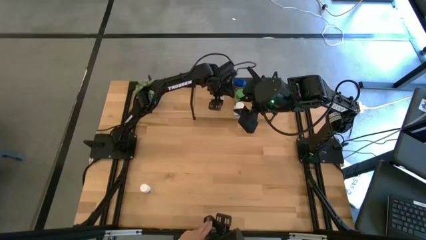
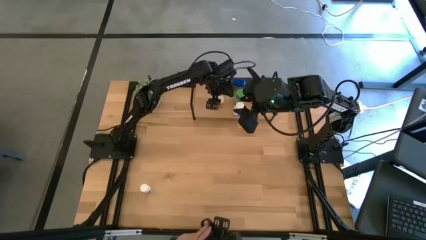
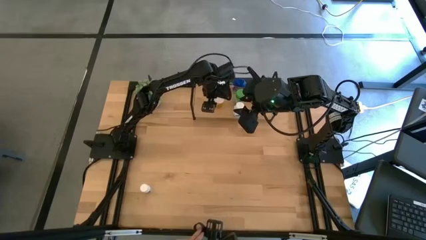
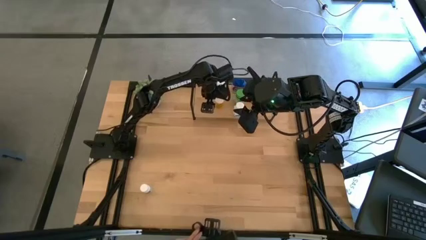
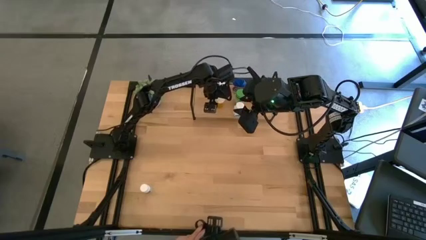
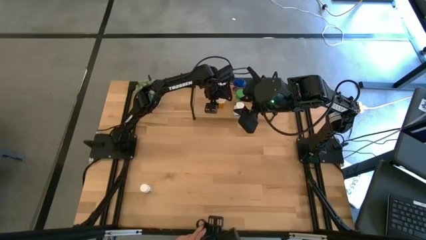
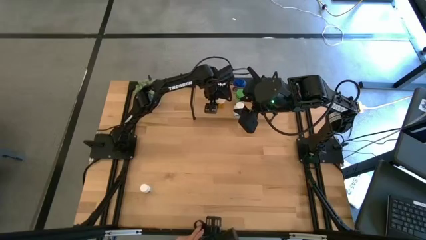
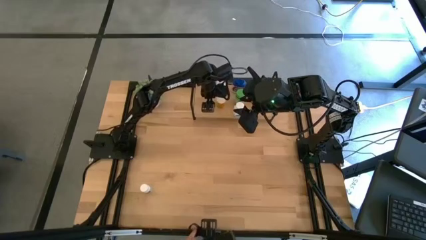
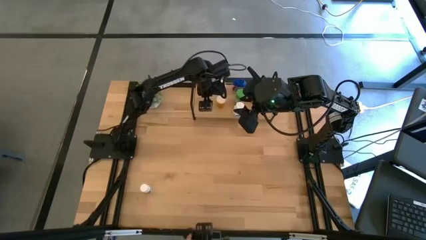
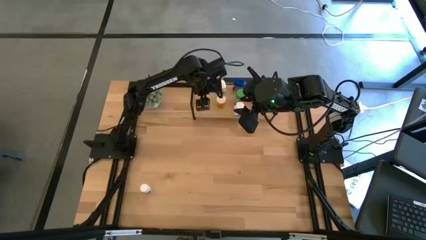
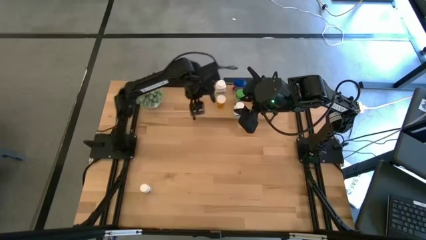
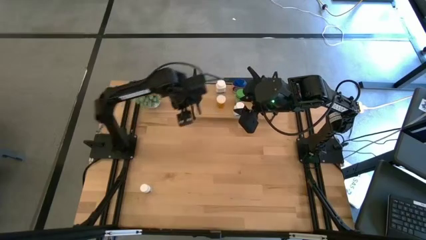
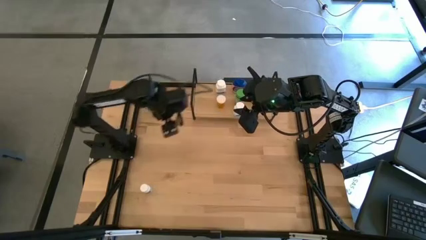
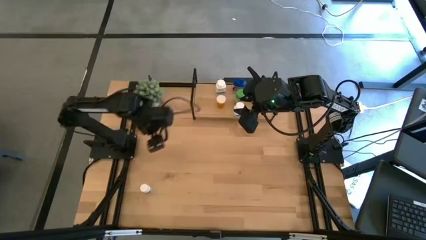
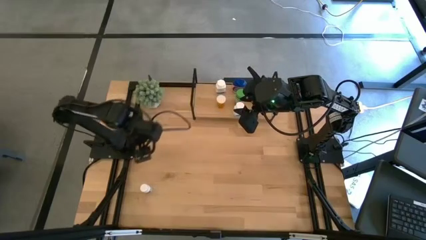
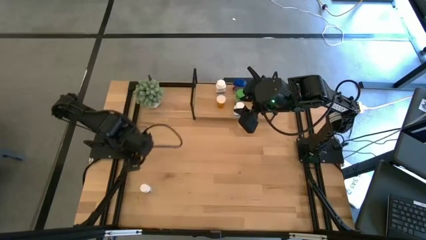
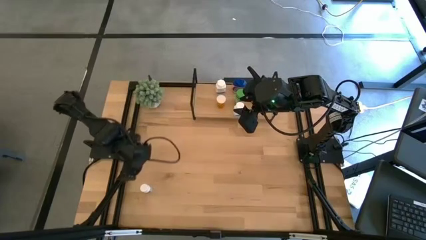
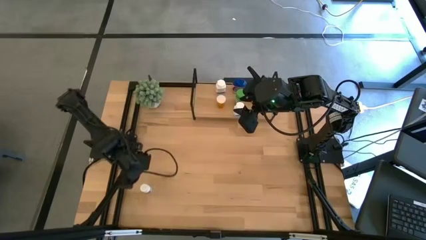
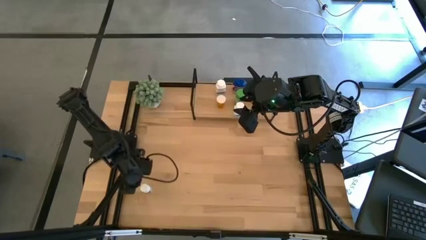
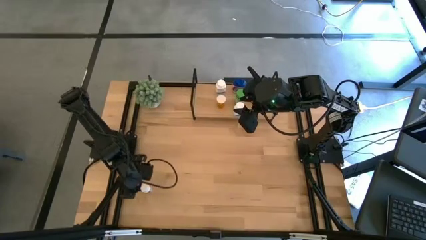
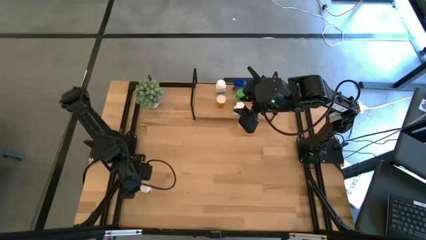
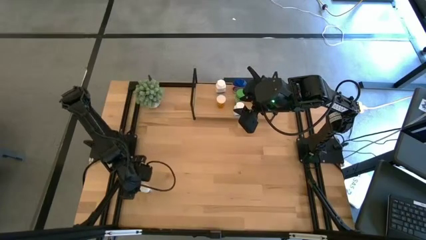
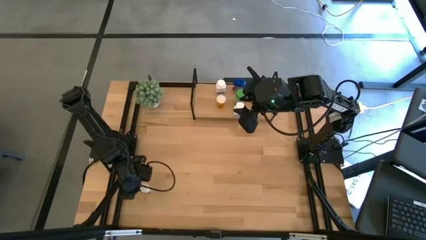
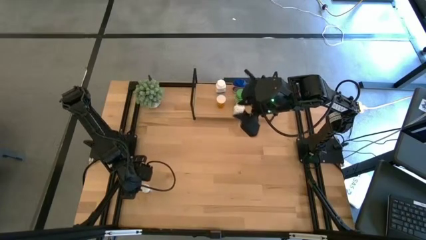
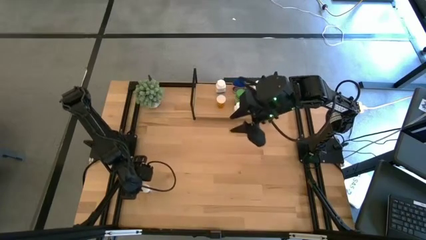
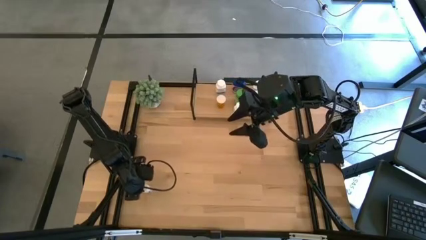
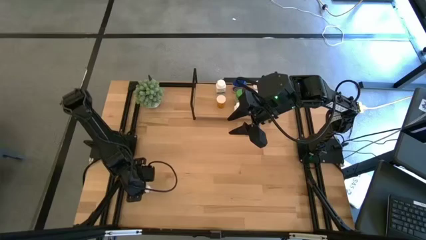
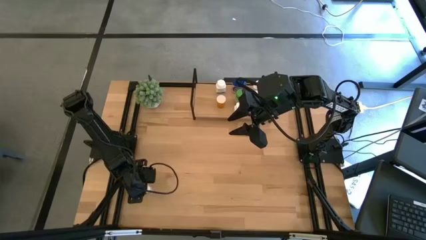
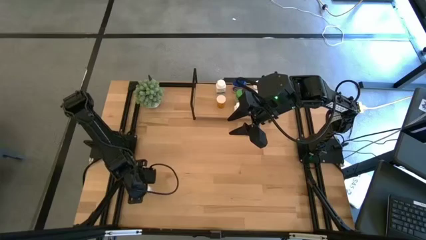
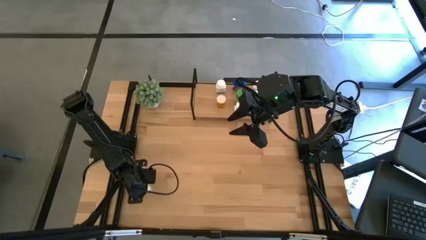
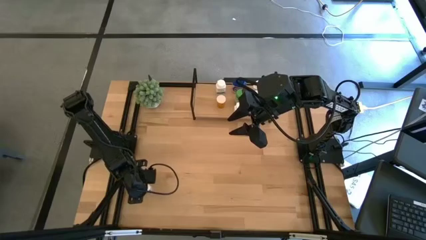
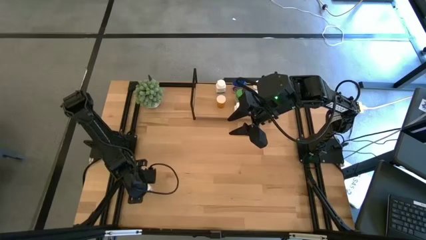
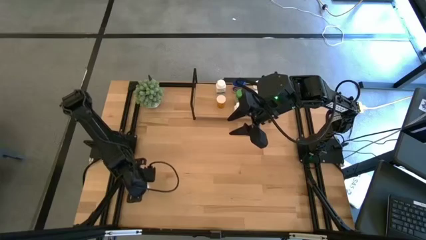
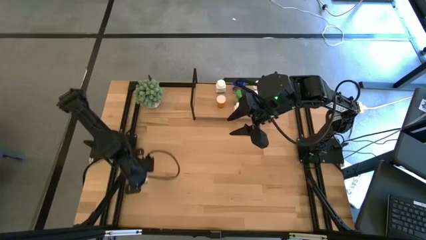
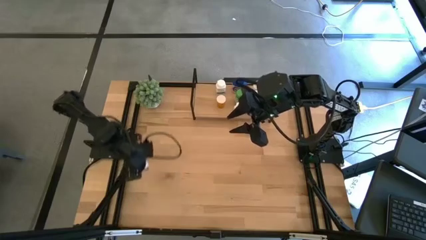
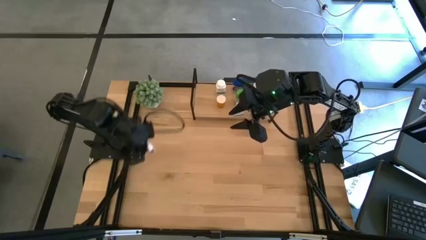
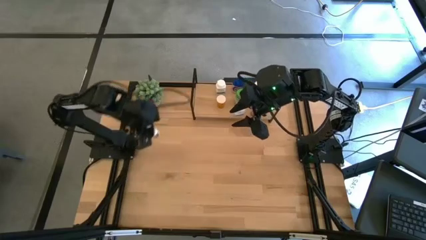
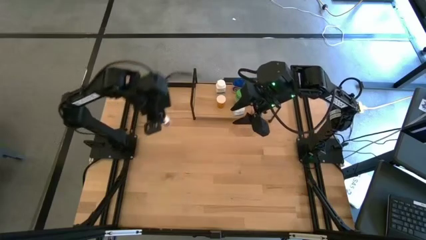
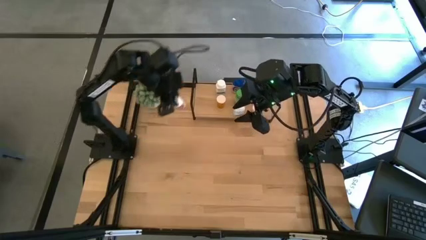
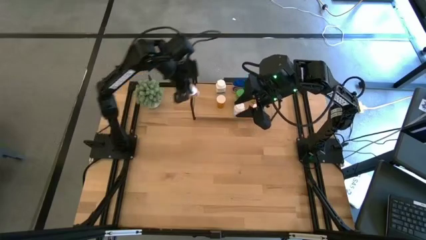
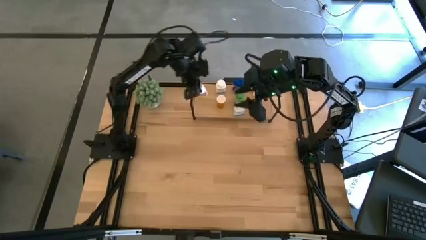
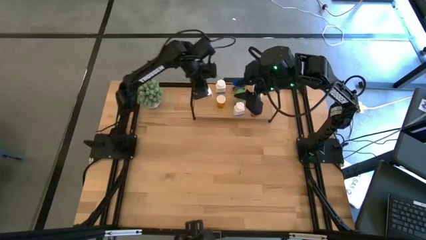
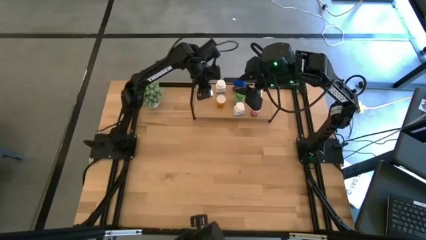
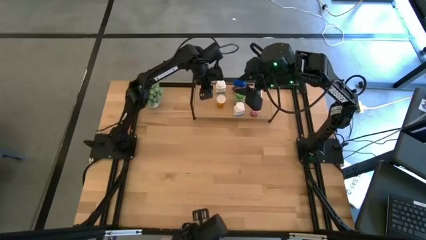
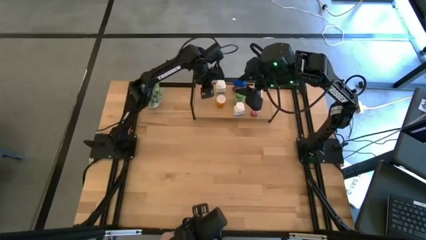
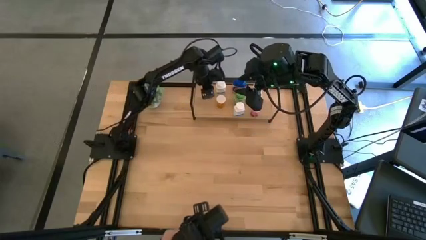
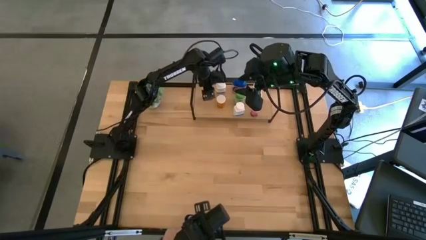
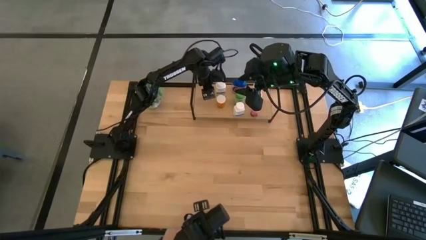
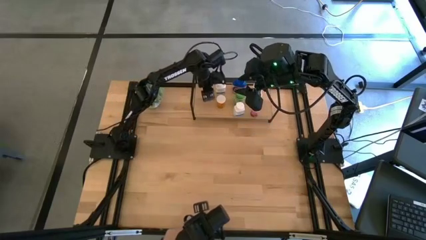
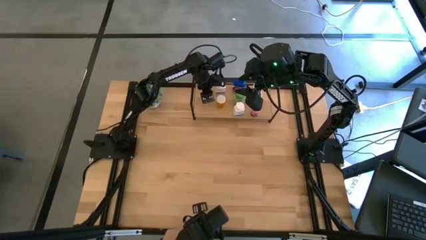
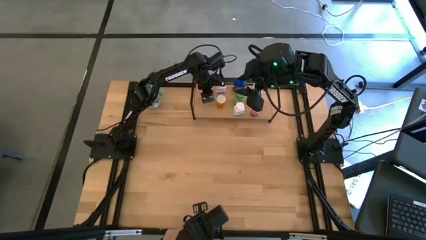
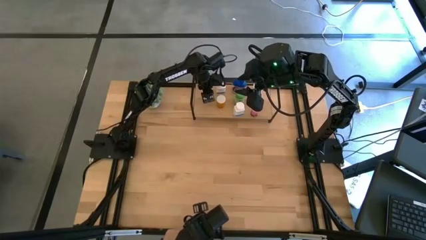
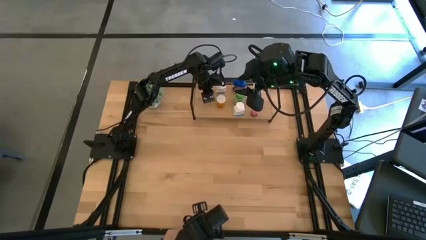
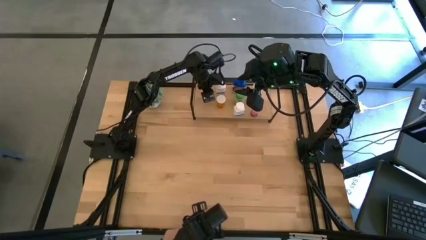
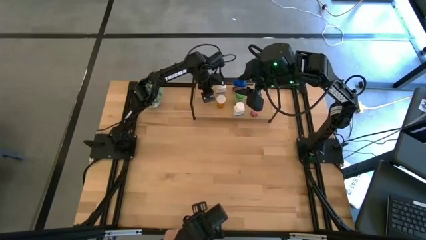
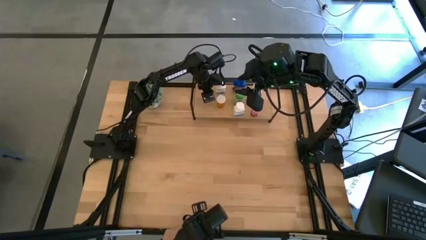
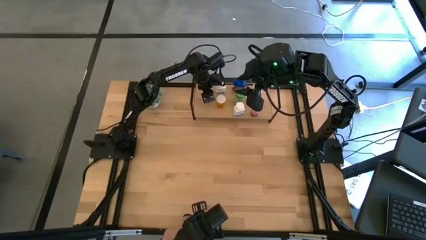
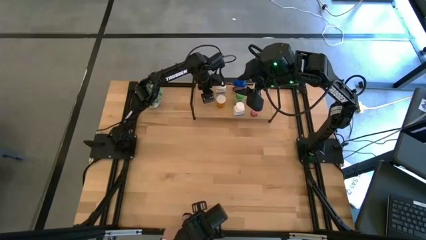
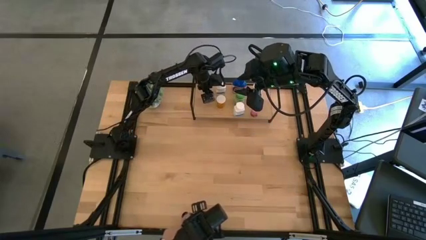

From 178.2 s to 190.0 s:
Task: Pick and place medicine bottles onto shelf by color
Put the white medicine bottle into the shelf

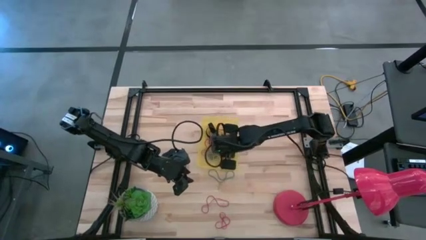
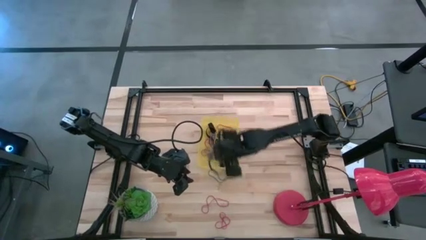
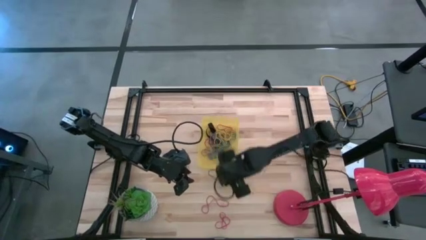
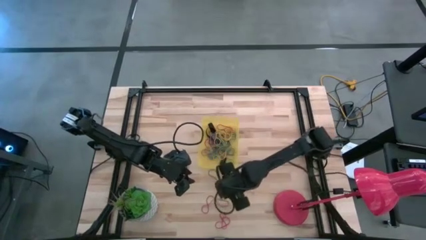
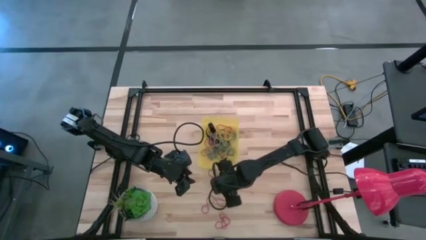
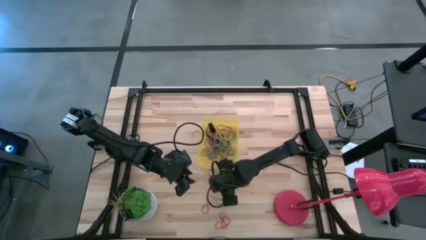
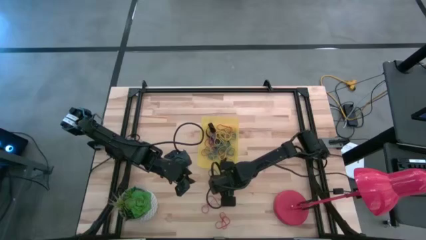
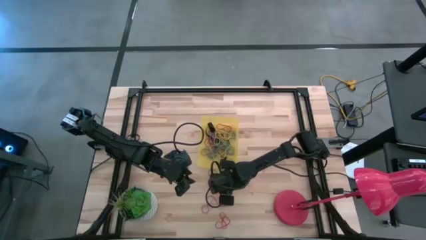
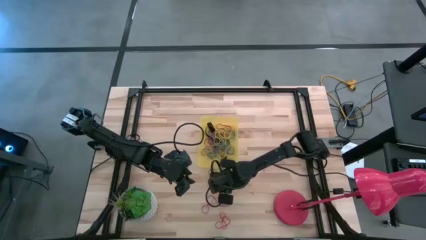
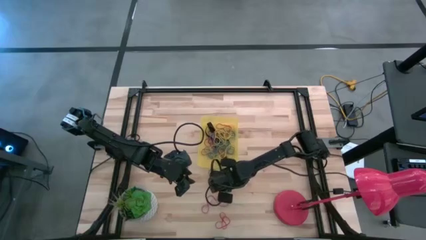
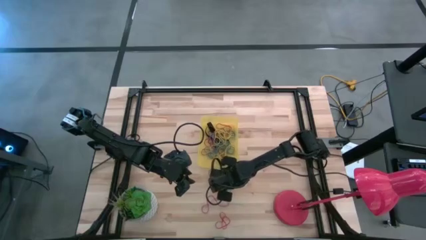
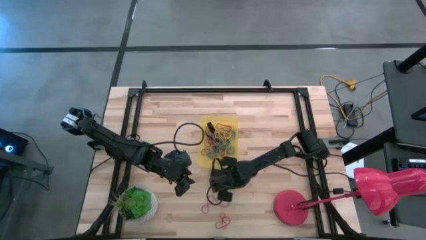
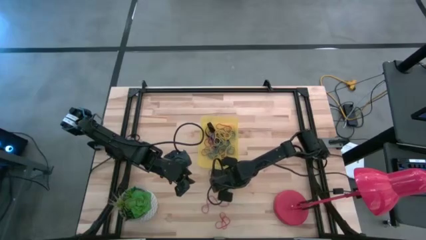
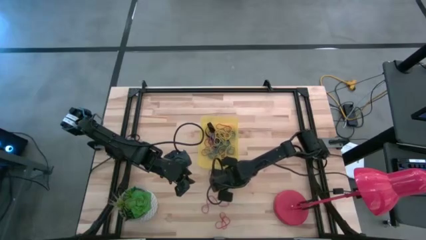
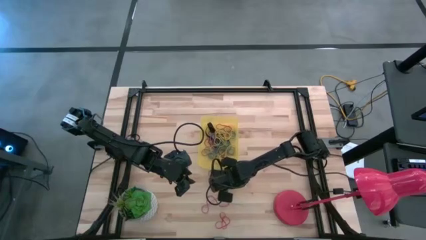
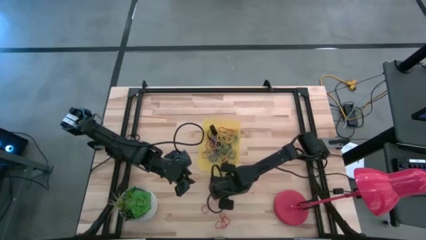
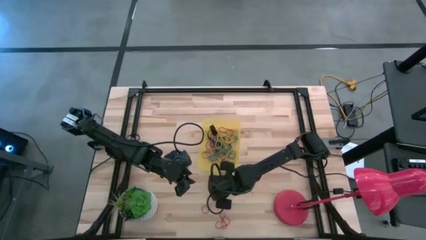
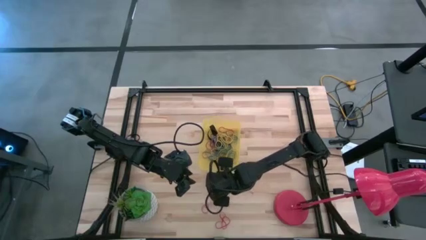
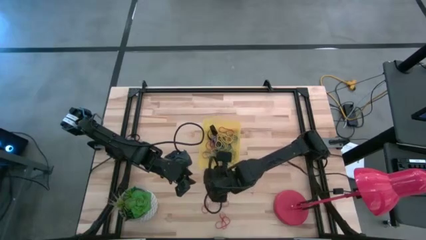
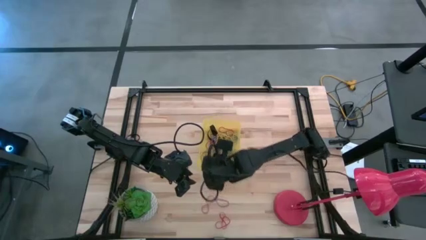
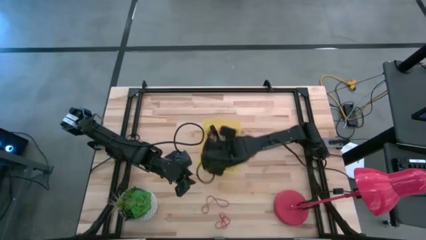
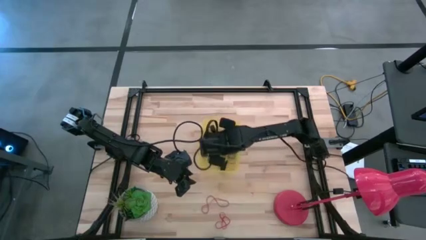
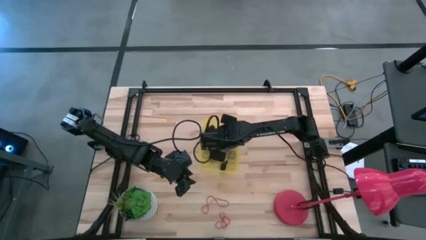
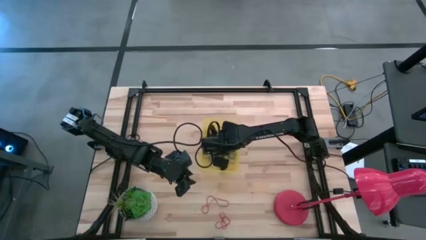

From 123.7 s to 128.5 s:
Task: Pick and place rubber bands into bin
Put the blue rubber band into the yellow bin
